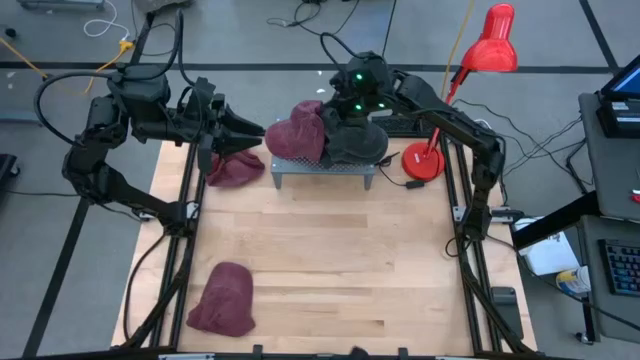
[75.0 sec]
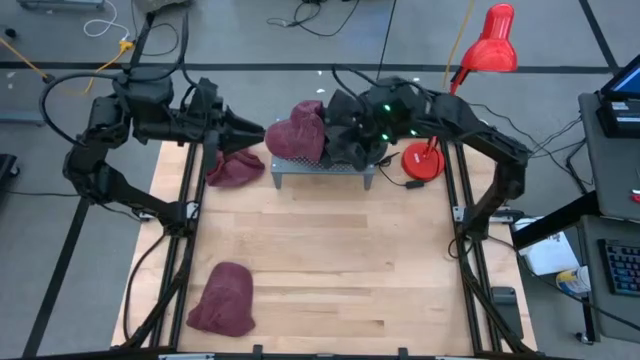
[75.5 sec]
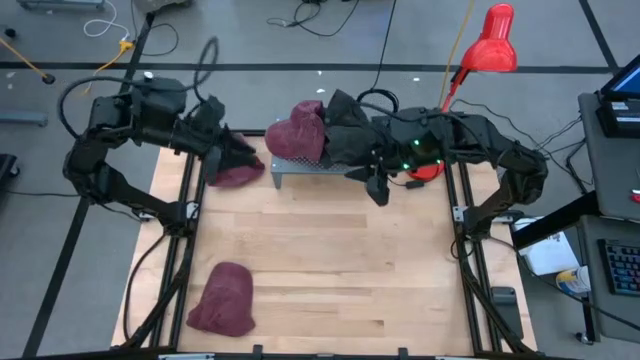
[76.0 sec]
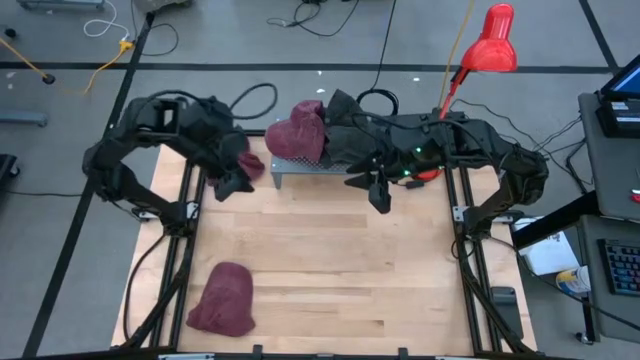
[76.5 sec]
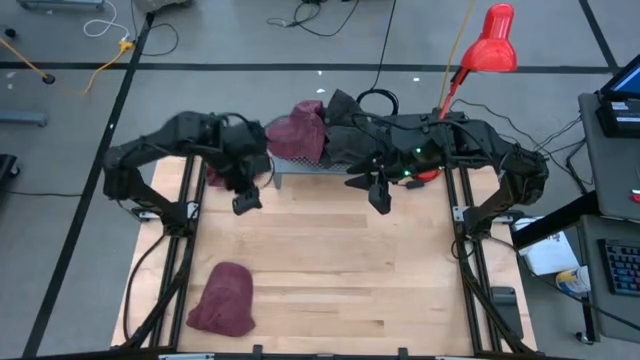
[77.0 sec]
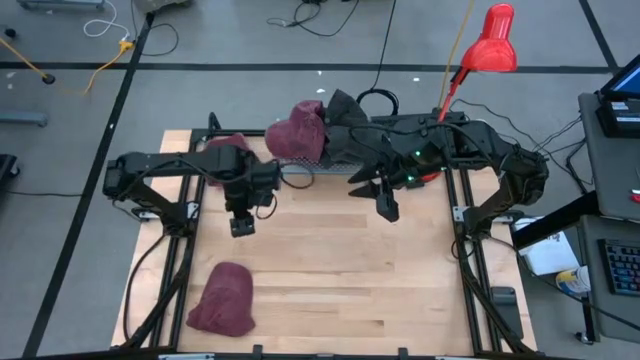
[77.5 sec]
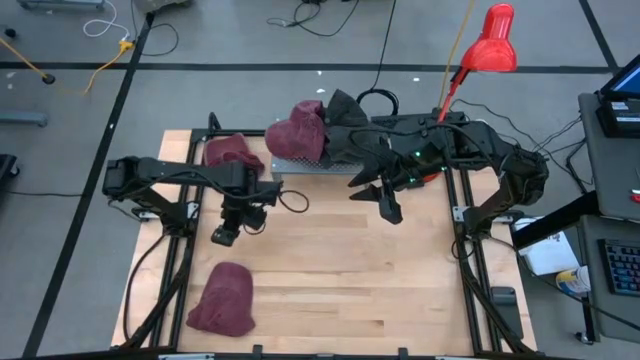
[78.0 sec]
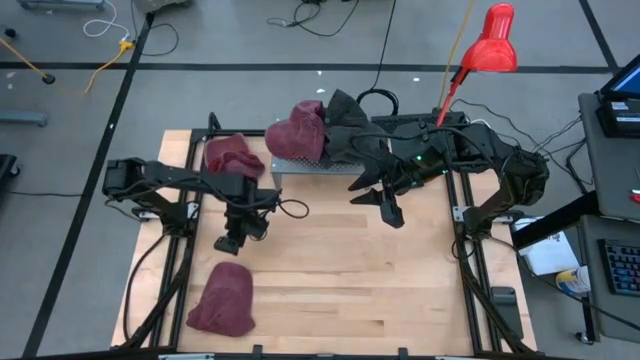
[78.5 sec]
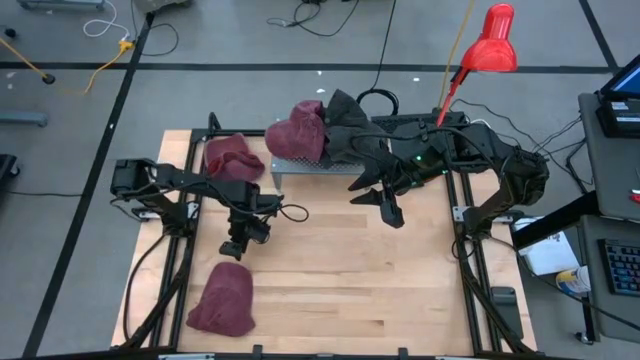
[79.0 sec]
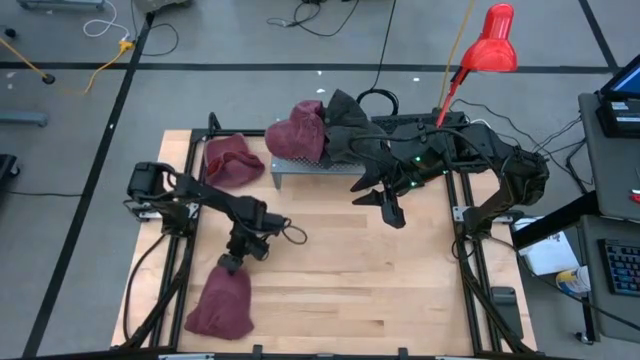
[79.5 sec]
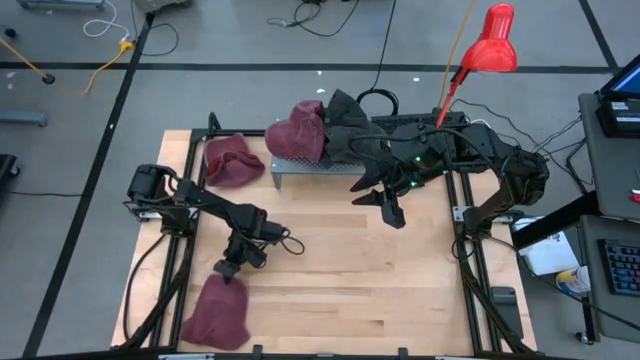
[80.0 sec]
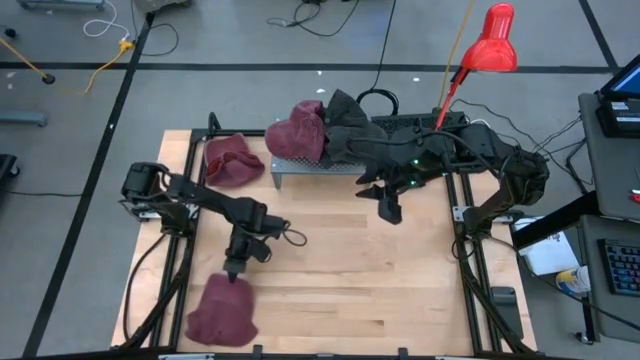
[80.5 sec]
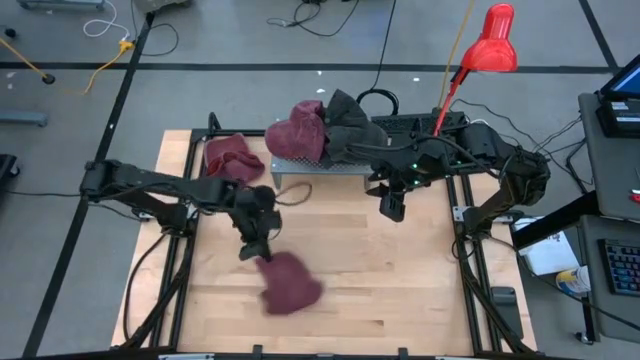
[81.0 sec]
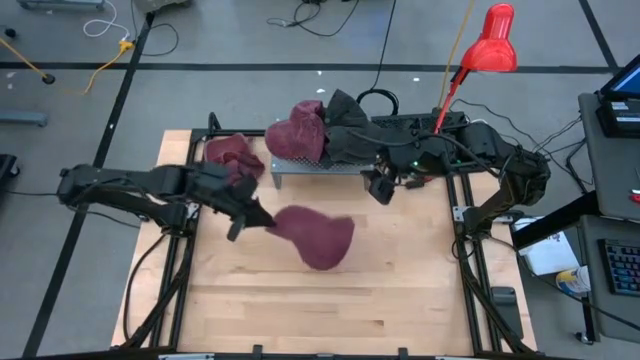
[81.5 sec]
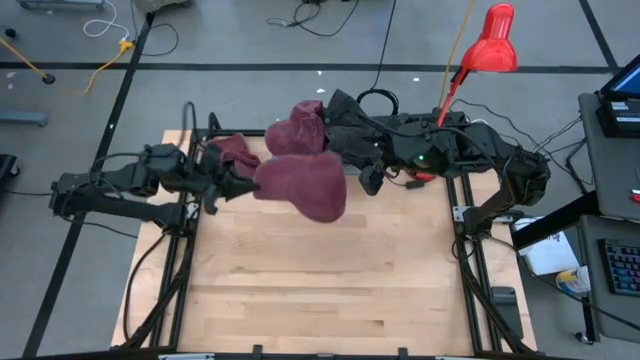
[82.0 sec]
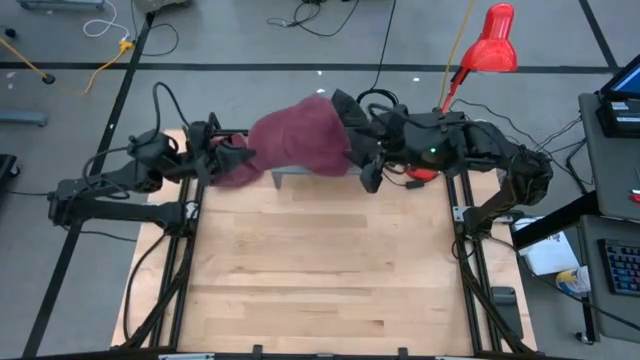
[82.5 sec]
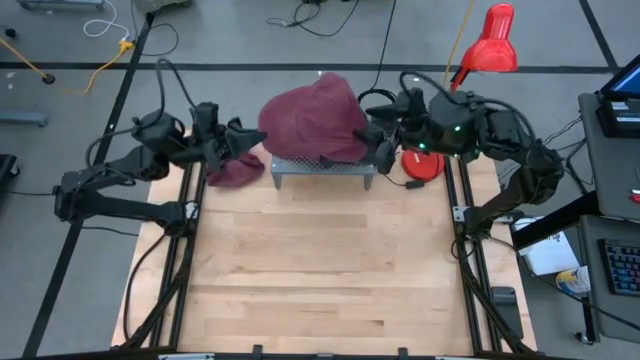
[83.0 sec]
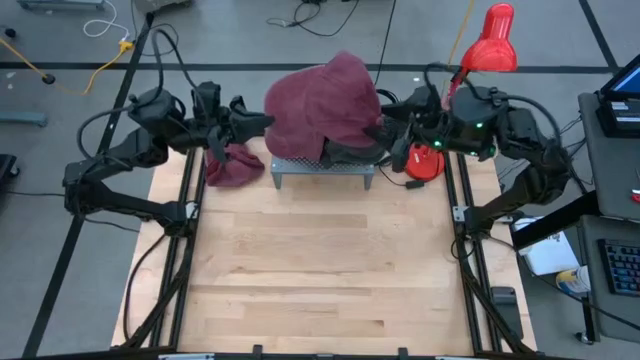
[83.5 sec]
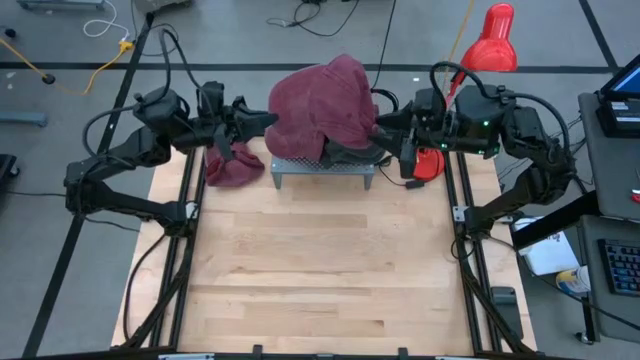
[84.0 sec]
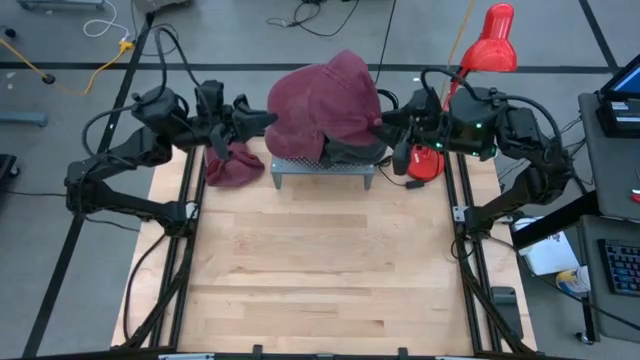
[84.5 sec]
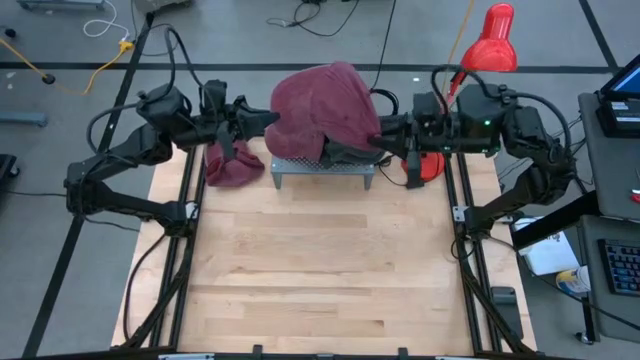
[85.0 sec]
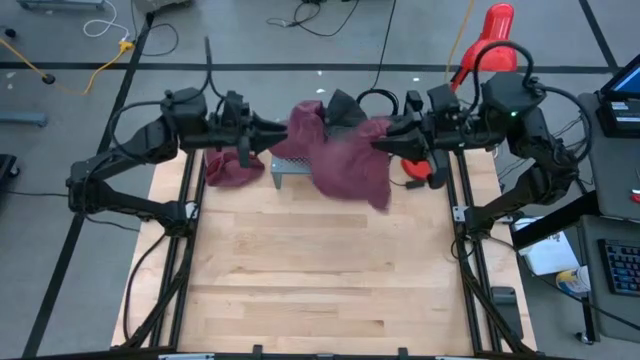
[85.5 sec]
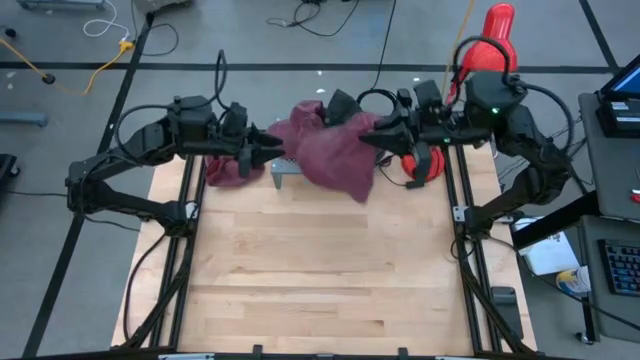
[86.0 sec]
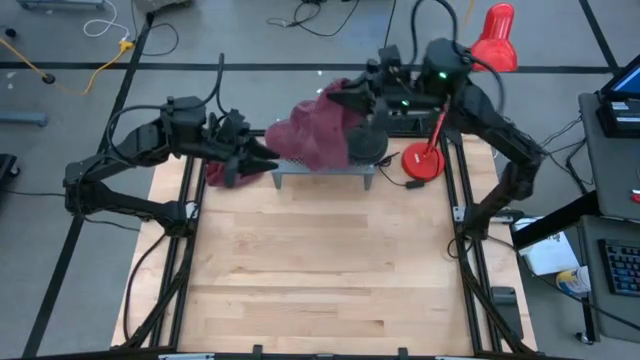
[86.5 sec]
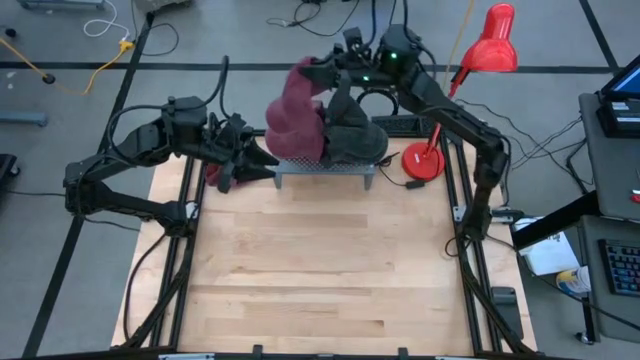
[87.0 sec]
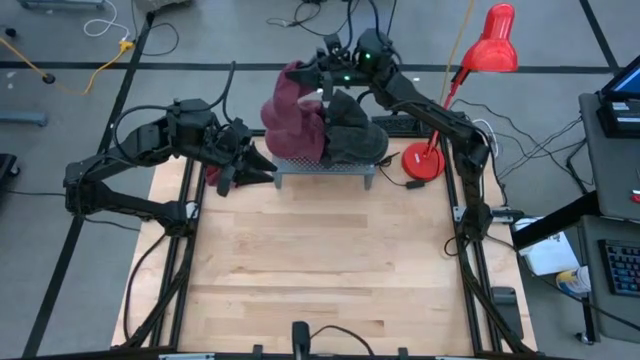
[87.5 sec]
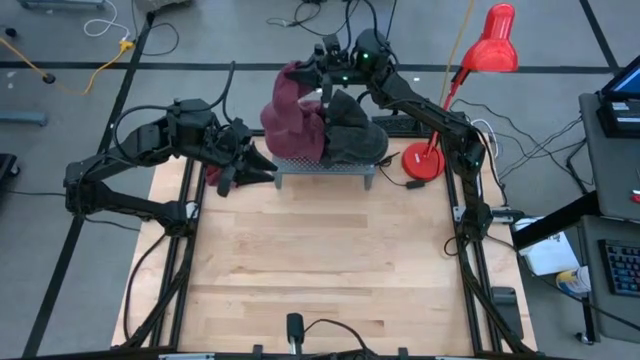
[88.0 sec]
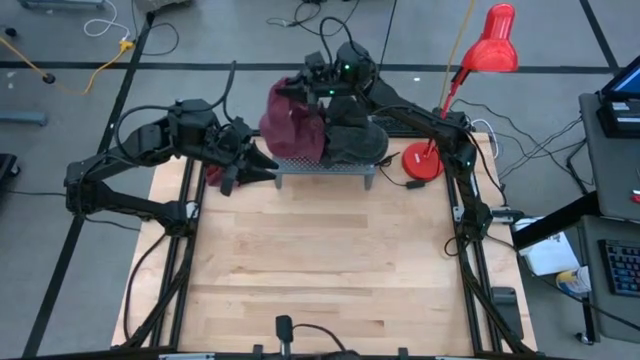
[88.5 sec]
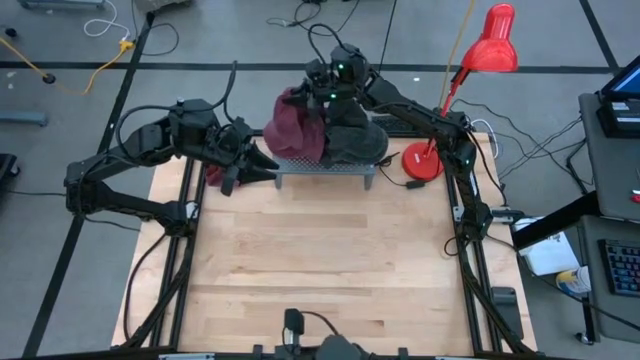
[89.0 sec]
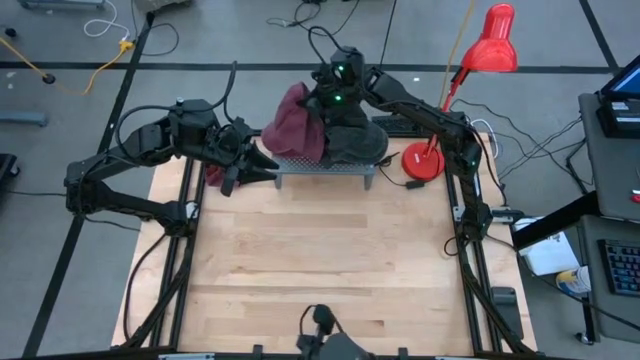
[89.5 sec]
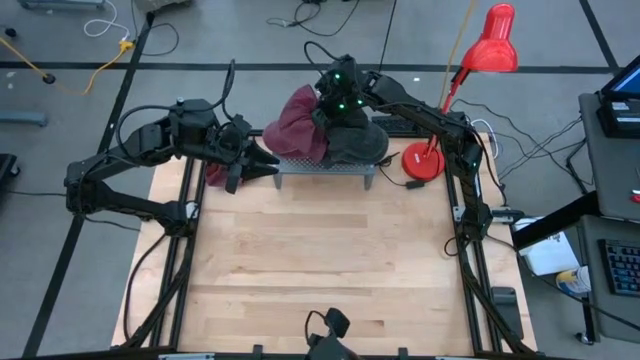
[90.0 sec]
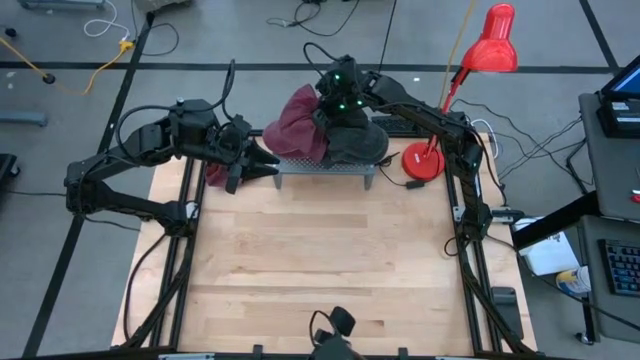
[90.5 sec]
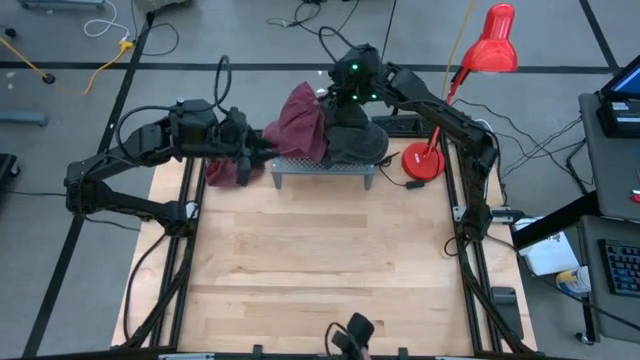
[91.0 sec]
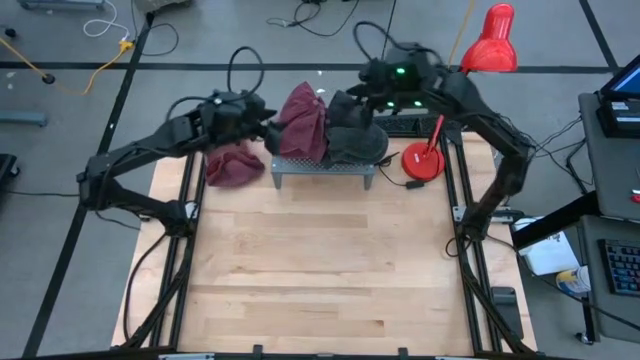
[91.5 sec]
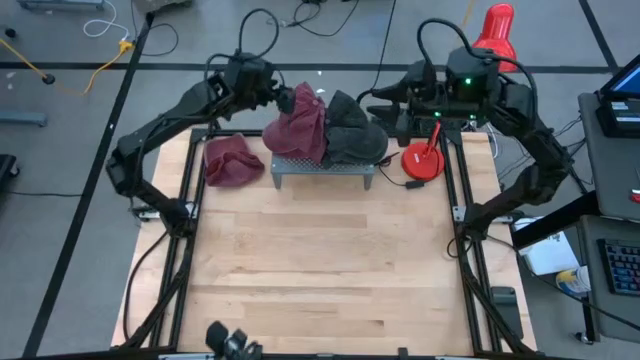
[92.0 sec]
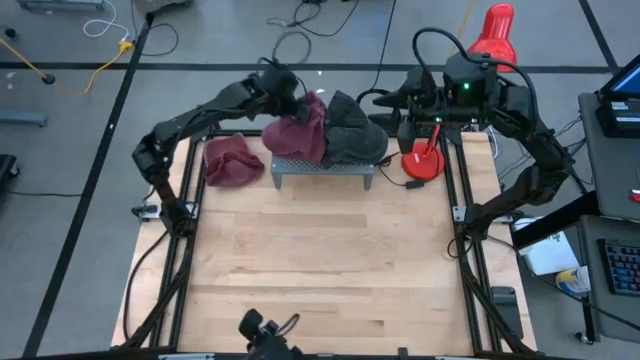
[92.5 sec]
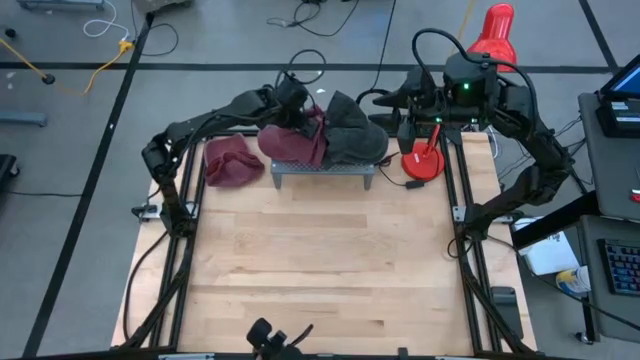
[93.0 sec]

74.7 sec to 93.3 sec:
Task: Pick & Place hat
Stack the bottom maroon cap on the maroon cap on the shelf

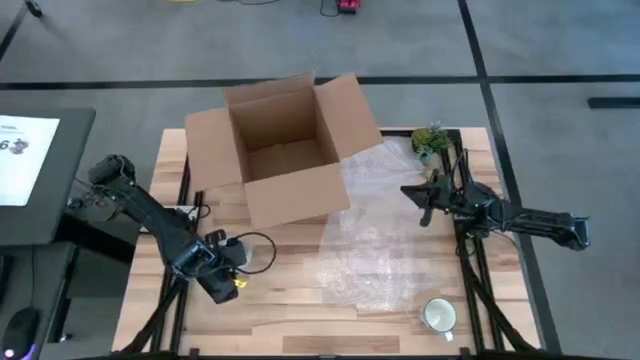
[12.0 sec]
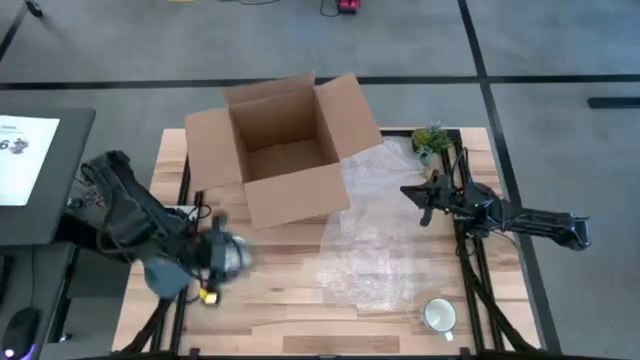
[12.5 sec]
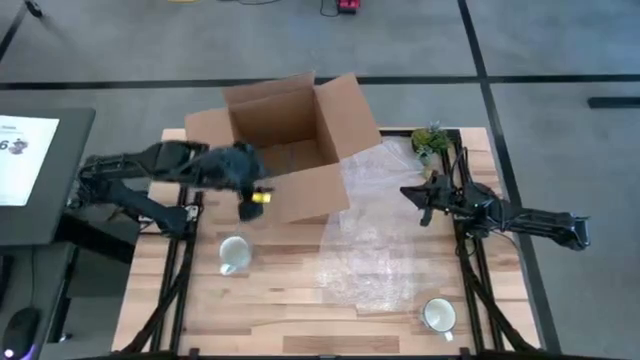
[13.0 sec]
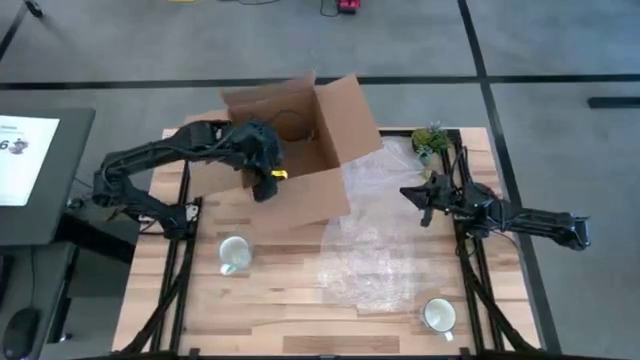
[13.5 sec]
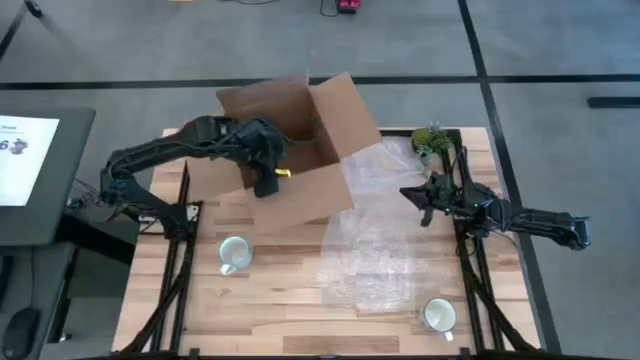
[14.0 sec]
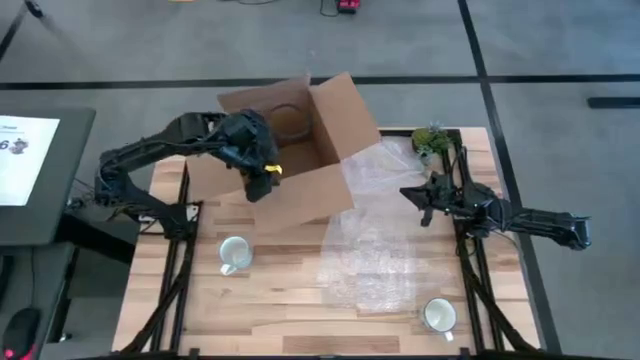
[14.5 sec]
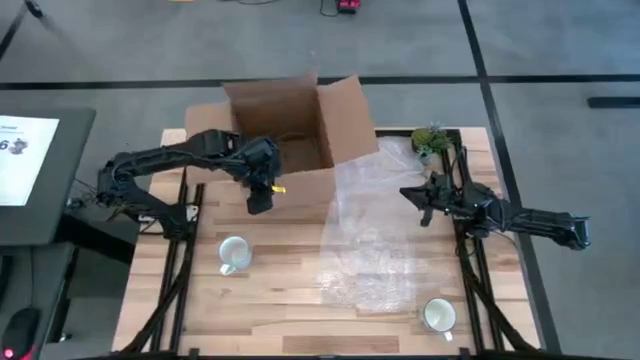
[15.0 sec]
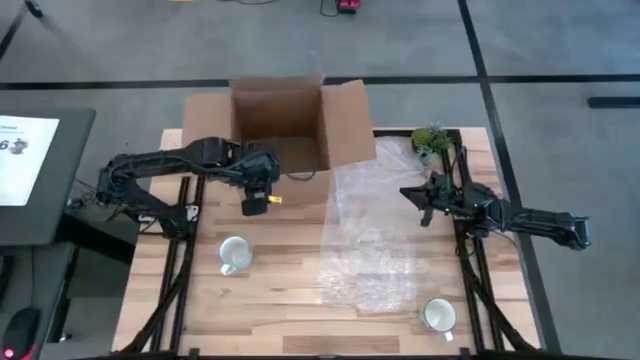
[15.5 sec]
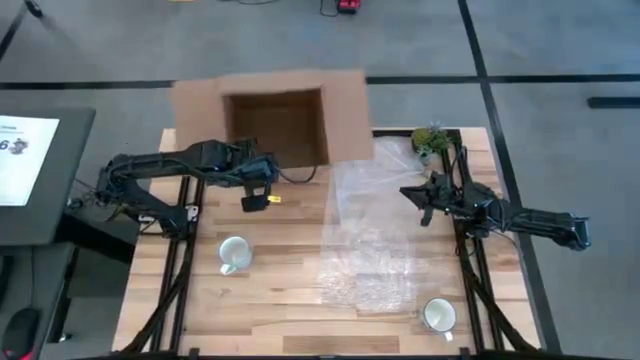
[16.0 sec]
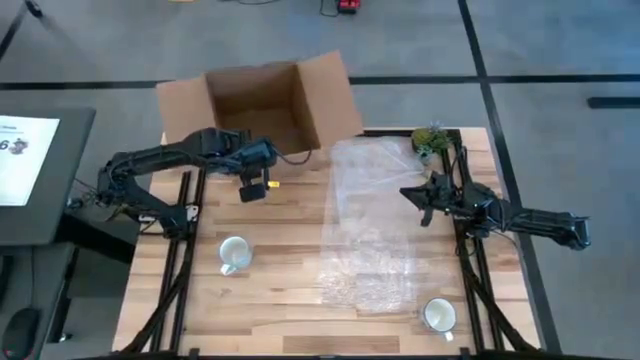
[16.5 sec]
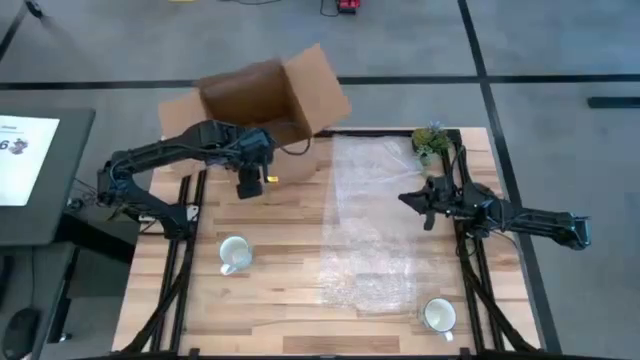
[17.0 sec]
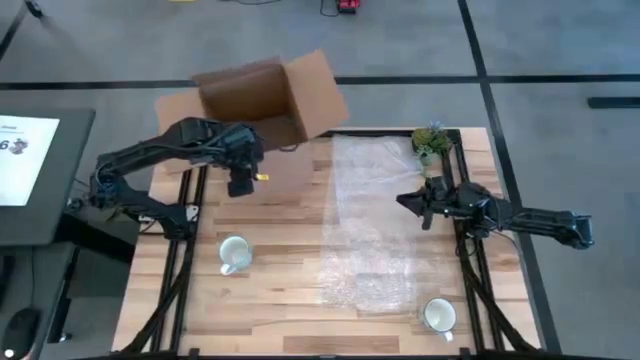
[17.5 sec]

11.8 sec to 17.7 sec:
Task: wrap mug
Adjust the brown cardboard box
